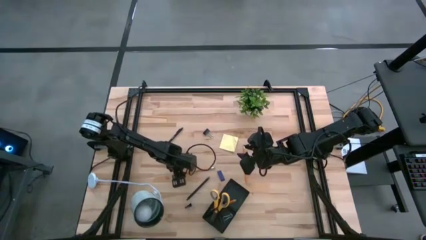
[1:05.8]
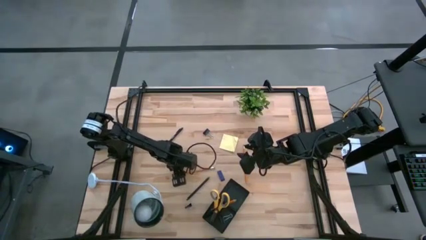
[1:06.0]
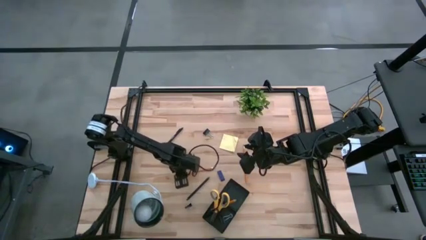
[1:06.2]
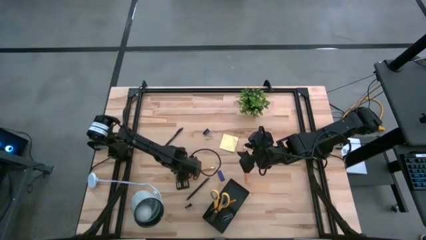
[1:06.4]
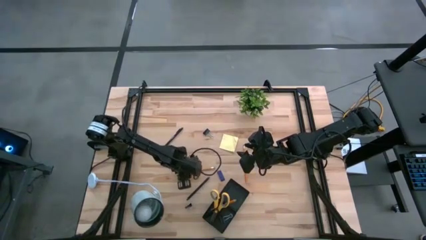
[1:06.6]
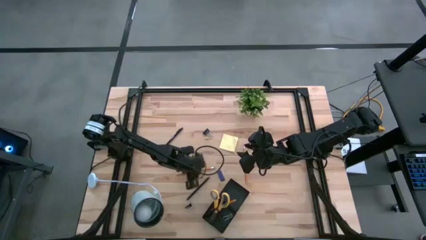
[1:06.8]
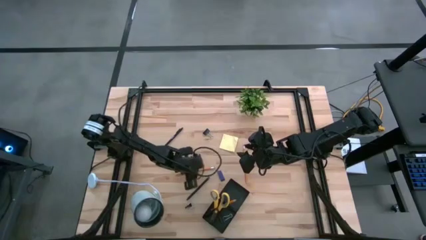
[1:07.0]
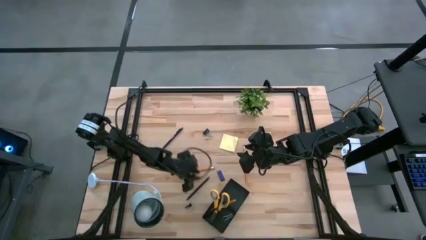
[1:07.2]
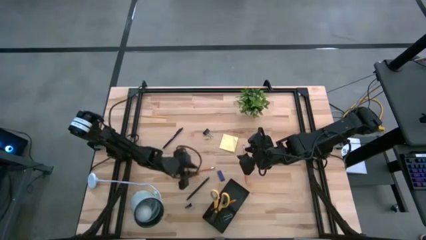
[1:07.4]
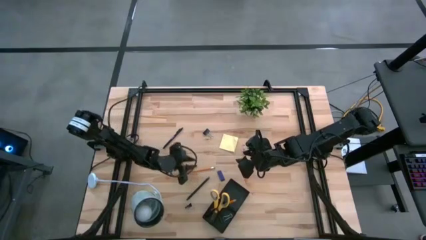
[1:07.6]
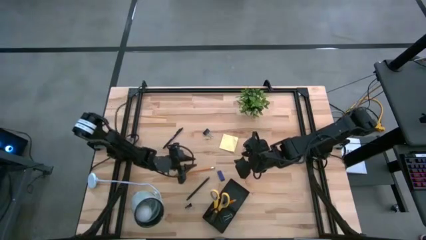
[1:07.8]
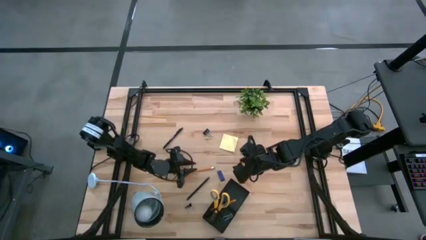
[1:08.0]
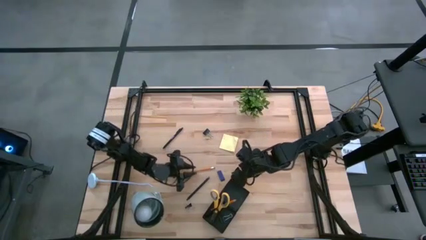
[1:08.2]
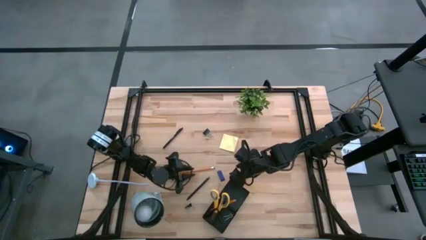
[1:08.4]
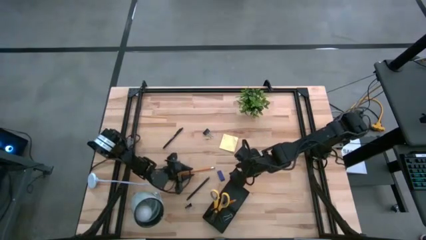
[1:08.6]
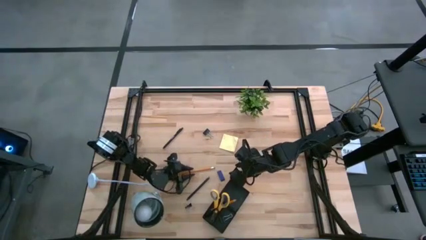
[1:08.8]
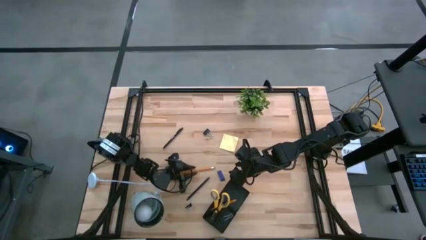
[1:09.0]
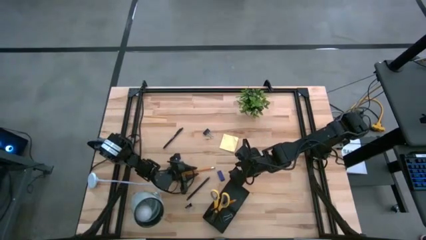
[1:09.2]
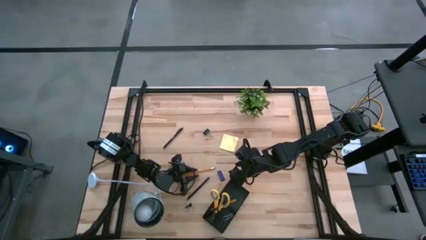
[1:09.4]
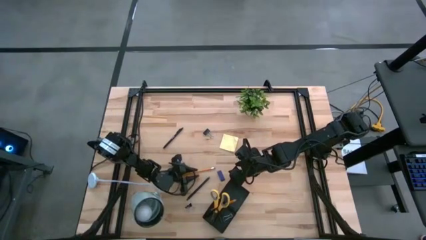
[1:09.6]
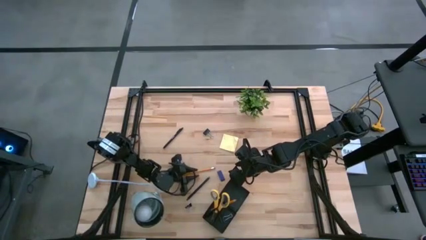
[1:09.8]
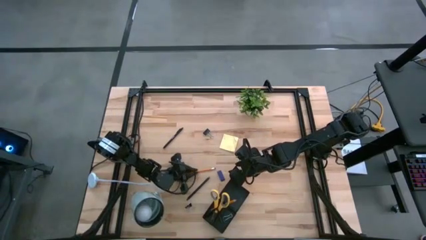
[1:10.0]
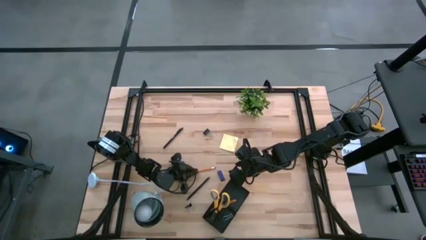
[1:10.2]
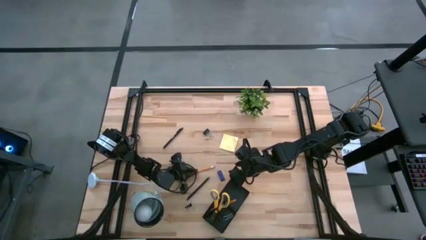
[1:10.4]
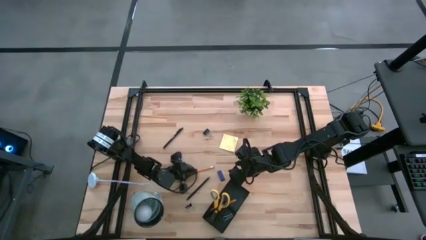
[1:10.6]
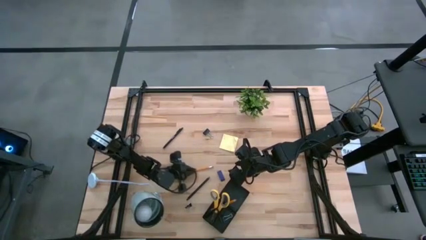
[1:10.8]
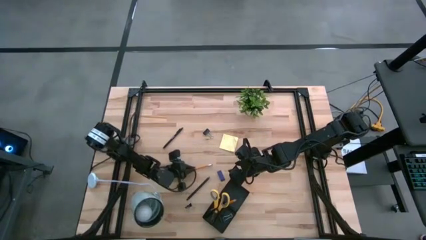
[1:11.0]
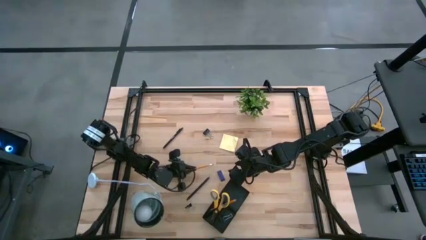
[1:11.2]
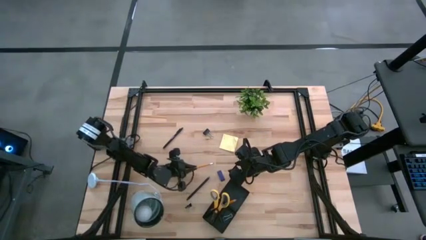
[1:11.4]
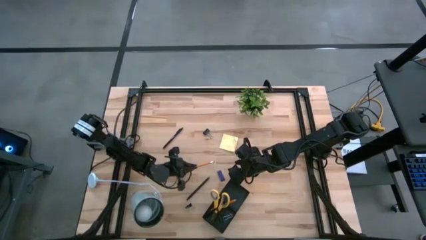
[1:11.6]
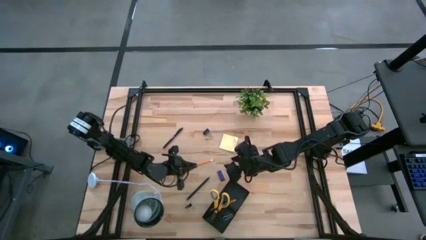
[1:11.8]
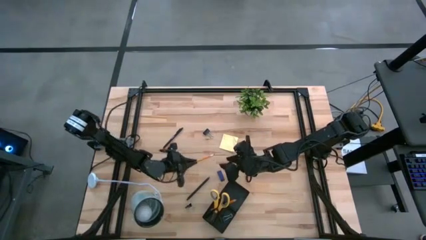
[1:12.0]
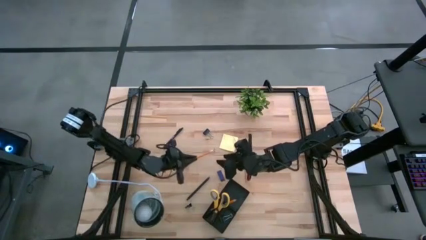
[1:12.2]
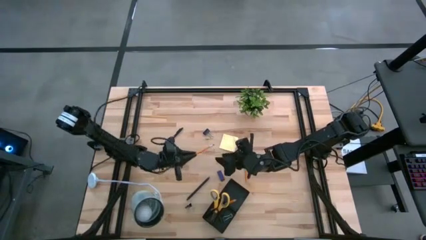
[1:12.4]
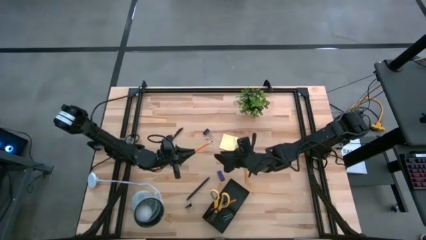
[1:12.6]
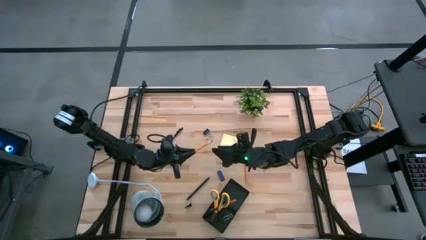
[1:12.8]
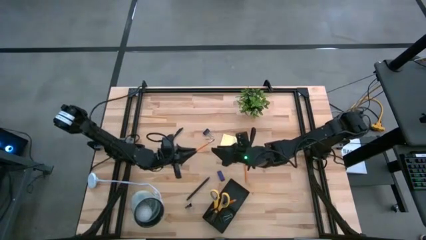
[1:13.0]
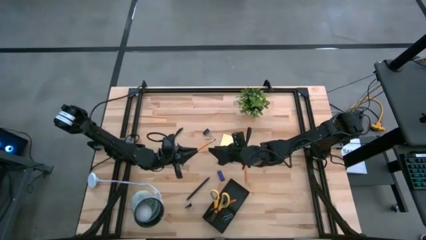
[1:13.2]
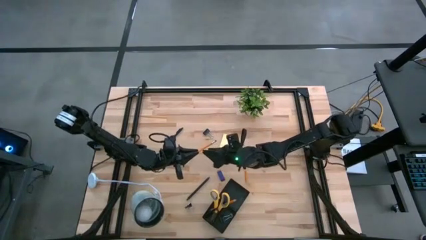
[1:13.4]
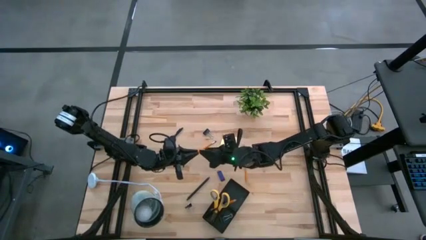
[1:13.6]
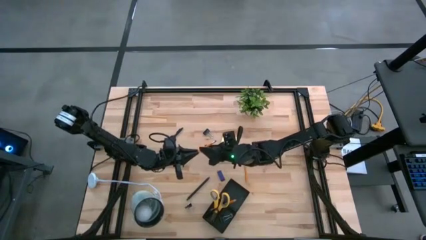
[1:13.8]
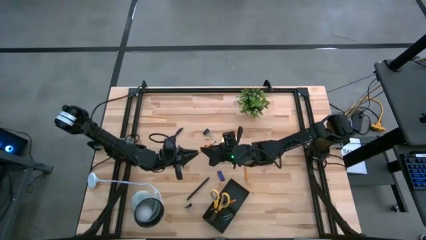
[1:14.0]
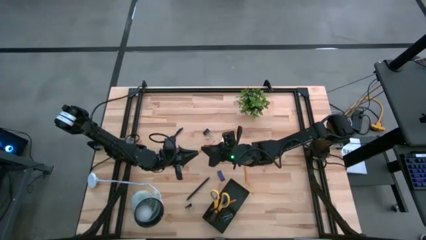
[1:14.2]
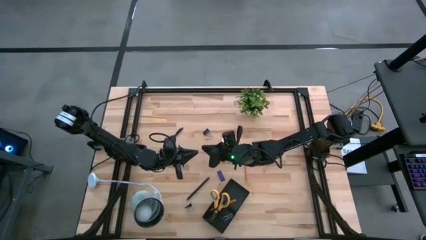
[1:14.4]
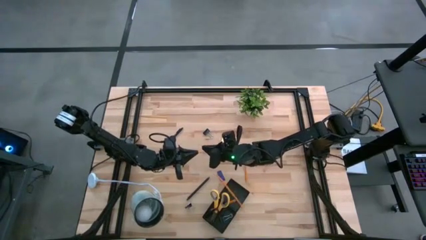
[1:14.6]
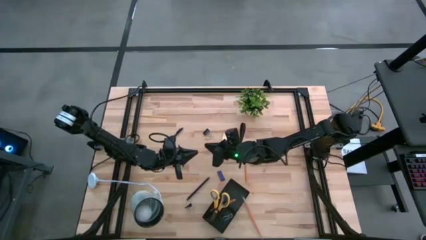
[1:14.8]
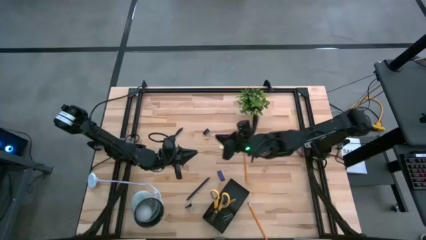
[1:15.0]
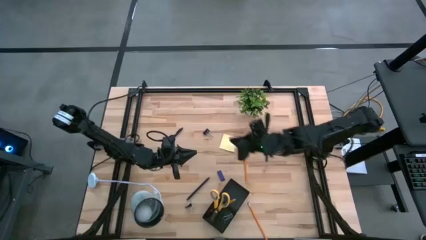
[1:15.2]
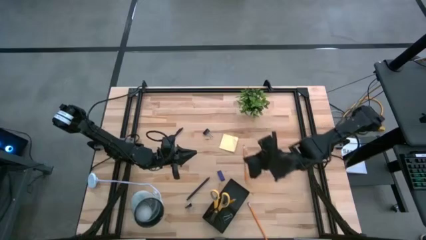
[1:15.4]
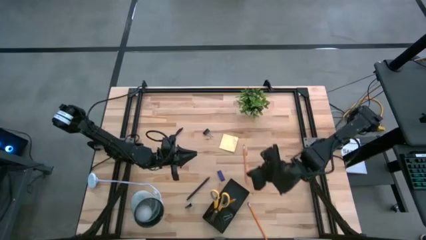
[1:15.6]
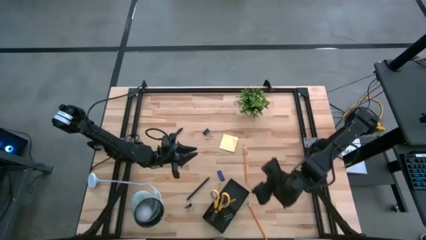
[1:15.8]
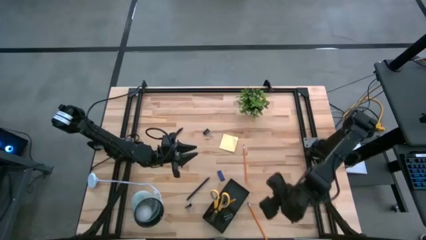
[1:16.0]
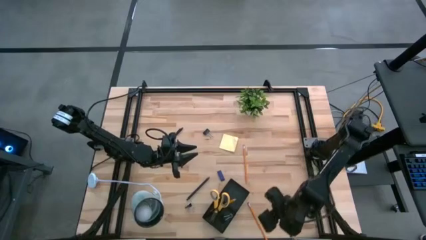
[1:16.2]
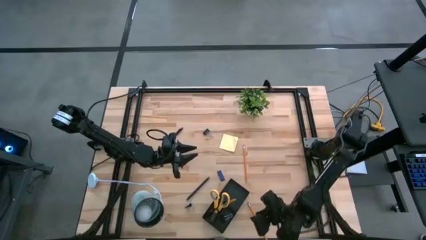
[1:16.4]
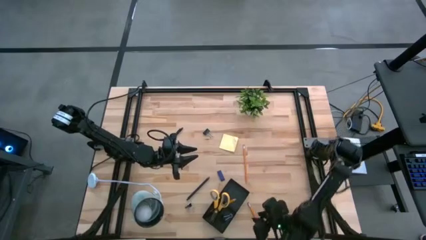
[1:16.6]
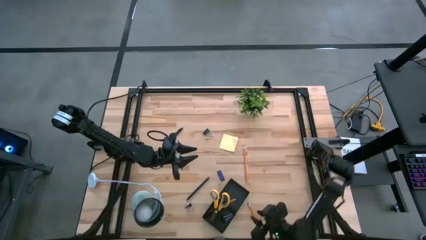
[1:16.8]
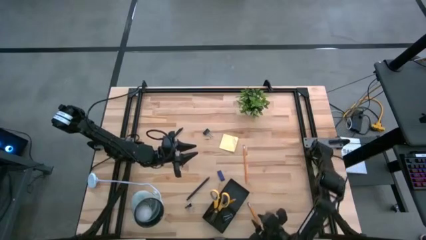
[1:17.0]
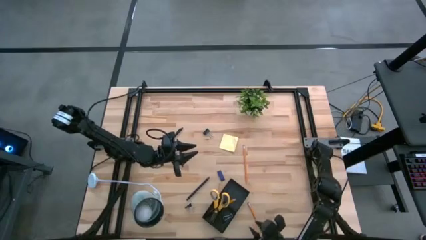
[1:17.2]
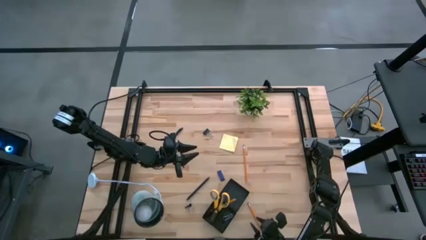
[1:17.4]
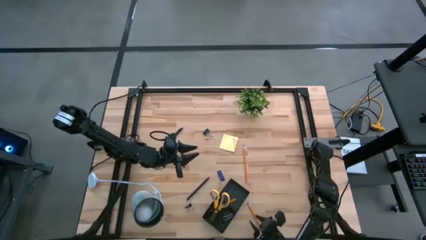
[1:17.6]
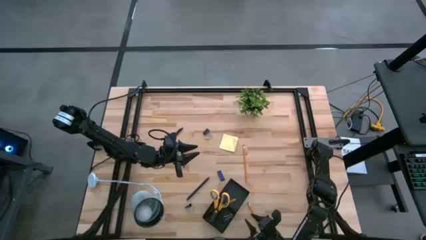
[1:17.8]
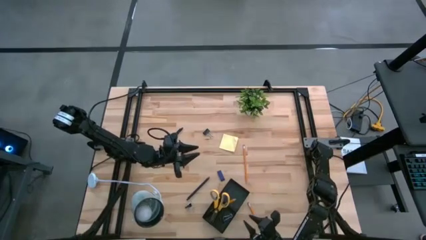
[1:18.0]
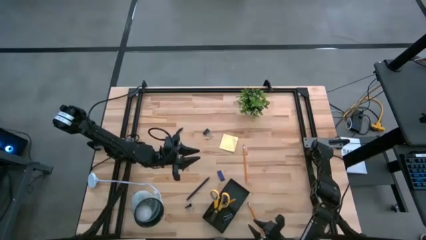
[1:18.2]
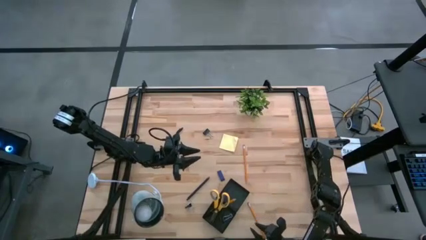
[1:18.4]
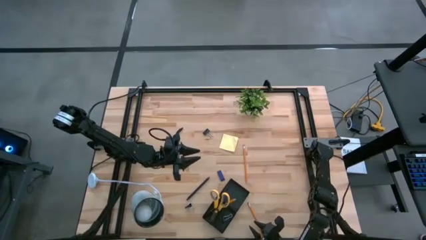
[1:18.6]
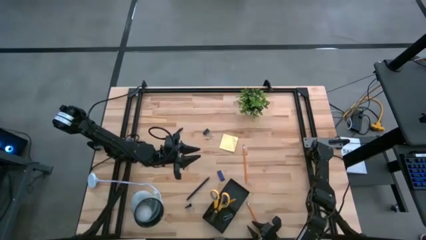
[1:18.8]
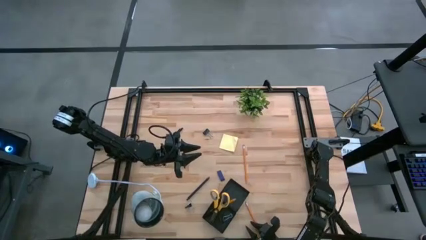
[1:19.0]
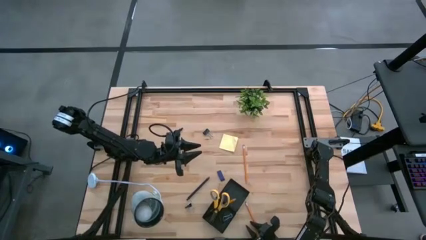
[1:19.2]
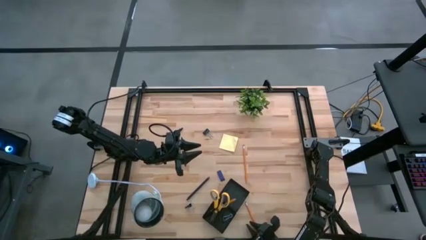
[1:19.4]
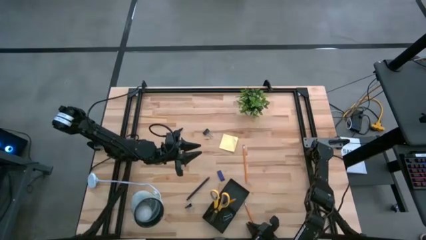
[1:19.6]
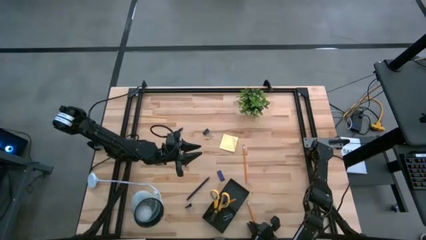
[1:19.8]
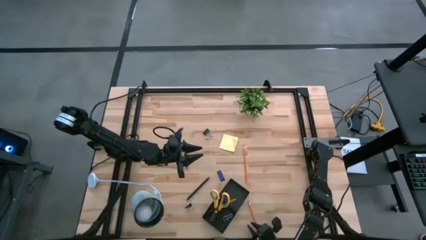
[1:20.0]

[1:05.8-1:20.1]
Task: Pick and place office supplies into organizer
Put the left pencil into the desk organizer
